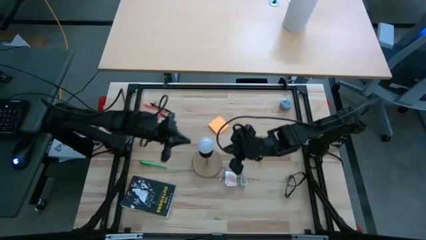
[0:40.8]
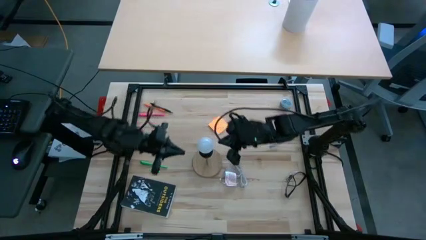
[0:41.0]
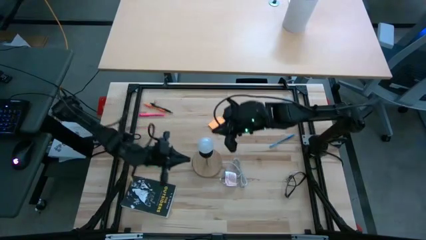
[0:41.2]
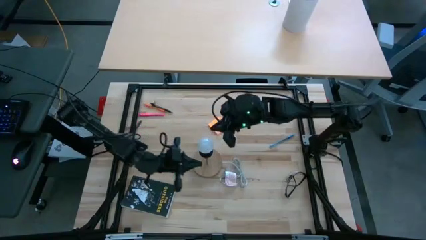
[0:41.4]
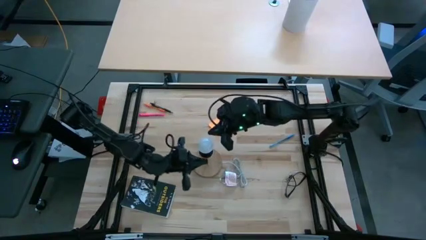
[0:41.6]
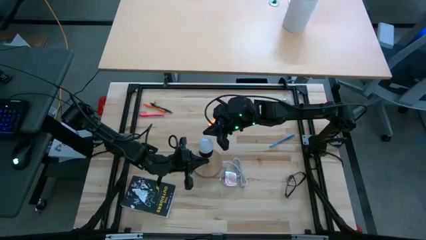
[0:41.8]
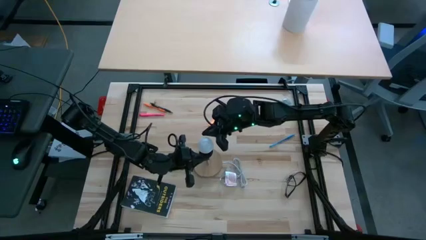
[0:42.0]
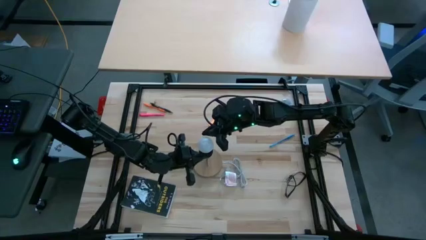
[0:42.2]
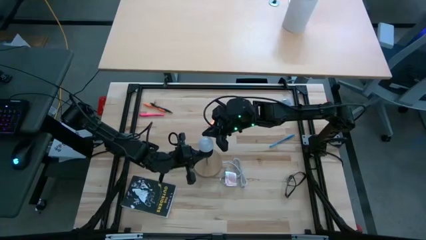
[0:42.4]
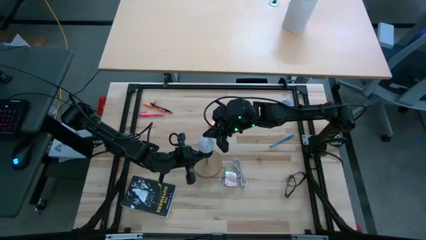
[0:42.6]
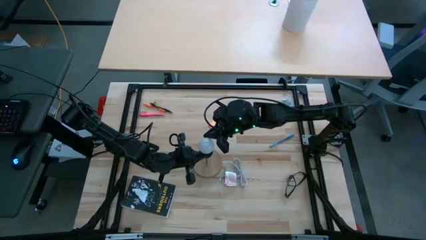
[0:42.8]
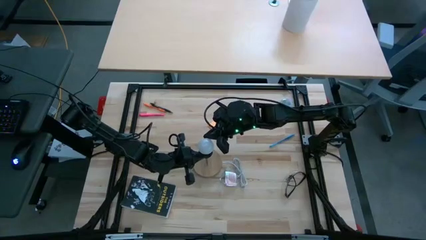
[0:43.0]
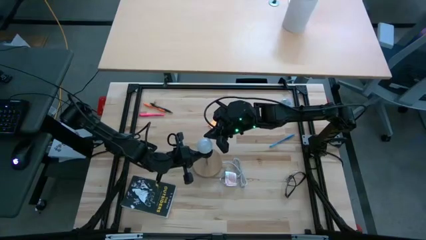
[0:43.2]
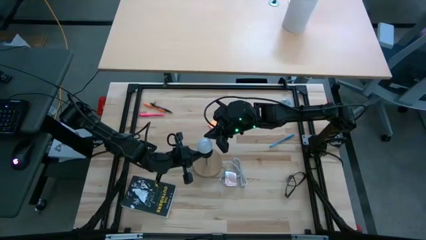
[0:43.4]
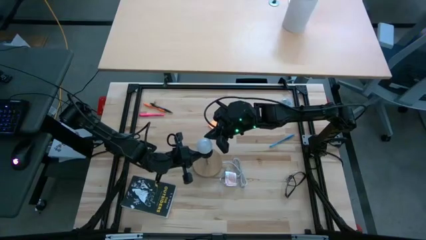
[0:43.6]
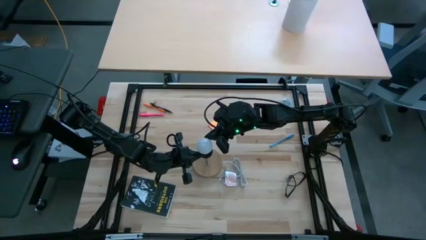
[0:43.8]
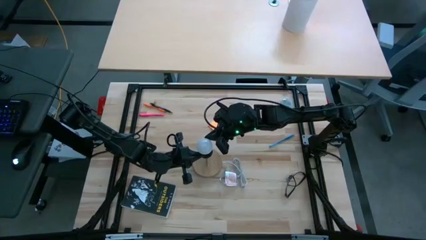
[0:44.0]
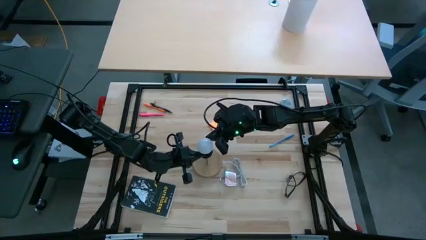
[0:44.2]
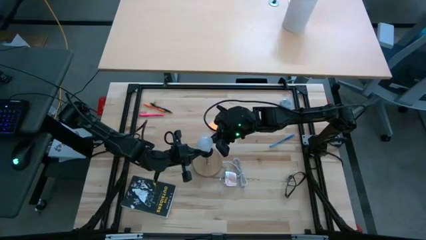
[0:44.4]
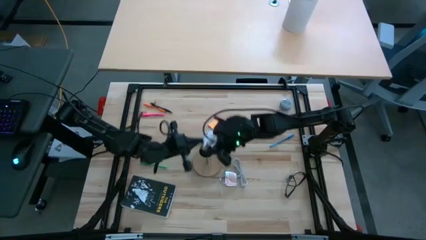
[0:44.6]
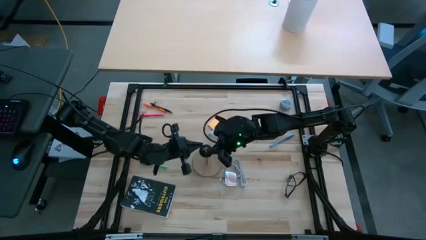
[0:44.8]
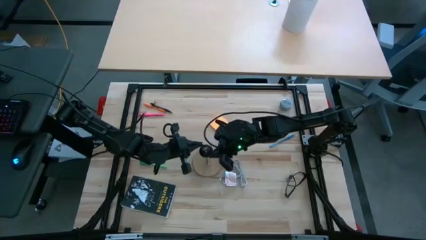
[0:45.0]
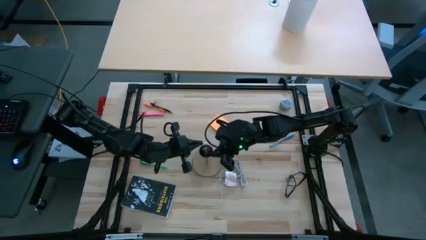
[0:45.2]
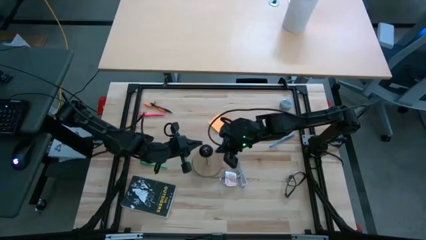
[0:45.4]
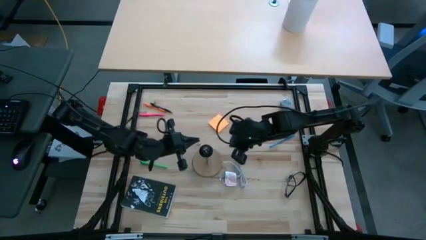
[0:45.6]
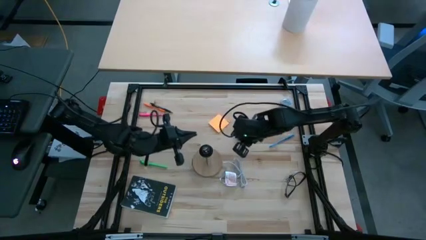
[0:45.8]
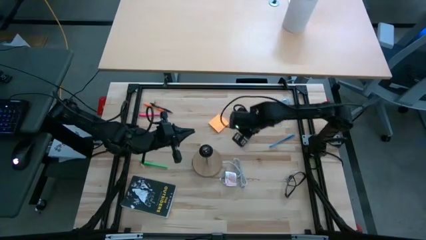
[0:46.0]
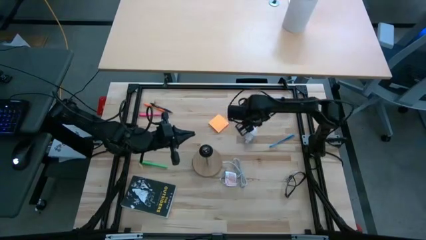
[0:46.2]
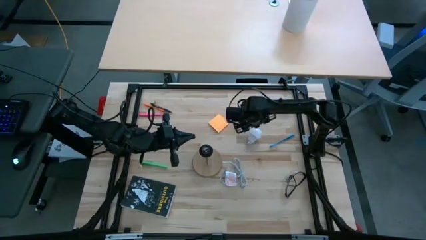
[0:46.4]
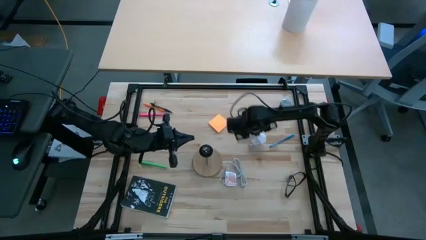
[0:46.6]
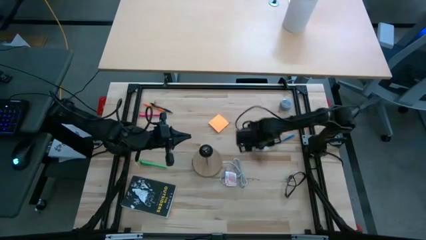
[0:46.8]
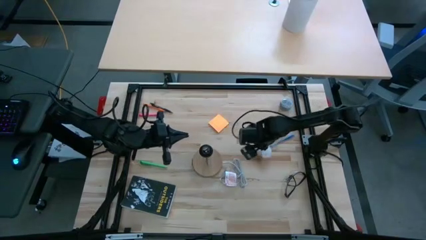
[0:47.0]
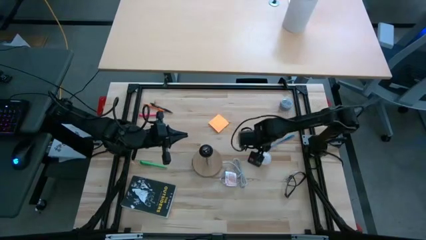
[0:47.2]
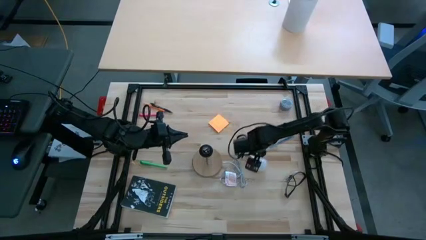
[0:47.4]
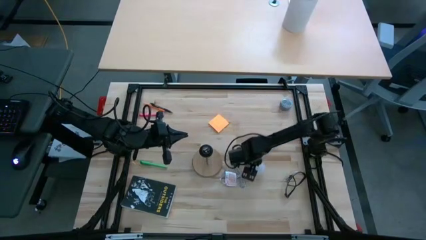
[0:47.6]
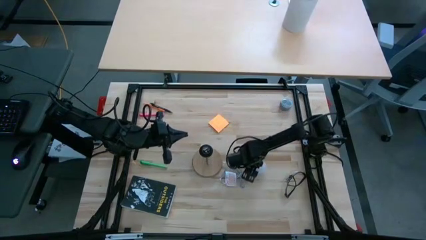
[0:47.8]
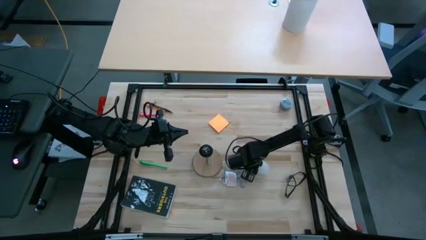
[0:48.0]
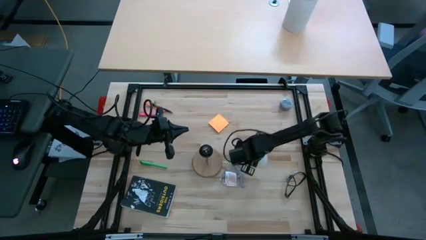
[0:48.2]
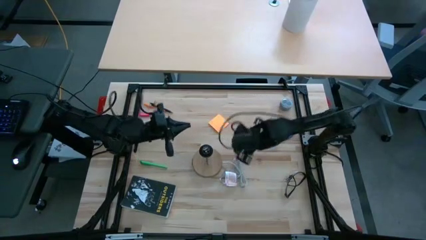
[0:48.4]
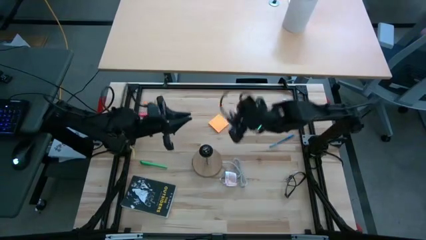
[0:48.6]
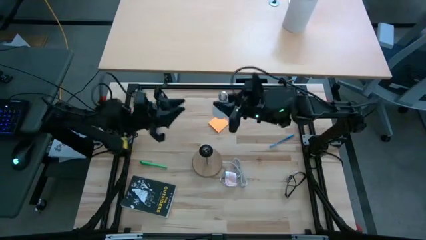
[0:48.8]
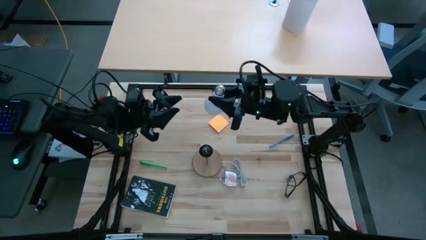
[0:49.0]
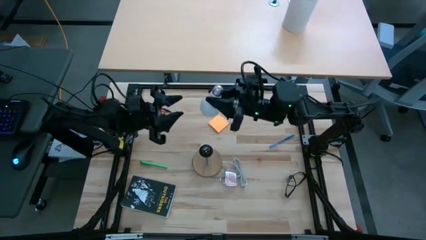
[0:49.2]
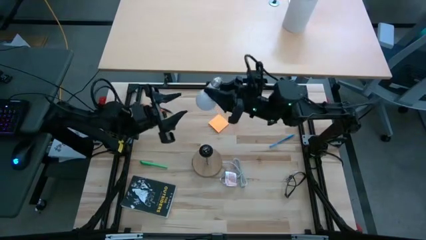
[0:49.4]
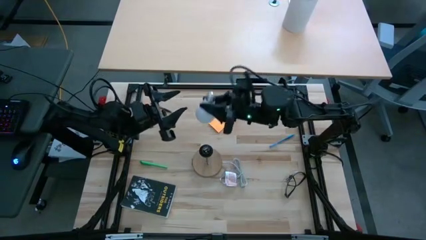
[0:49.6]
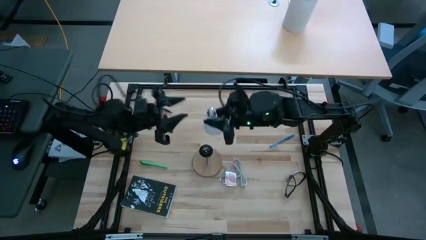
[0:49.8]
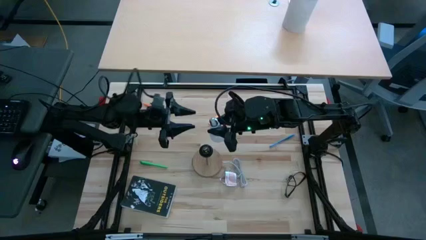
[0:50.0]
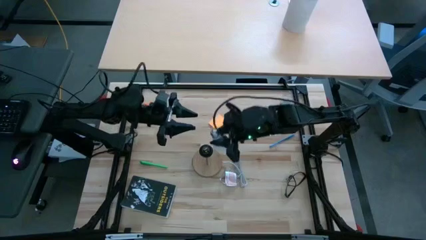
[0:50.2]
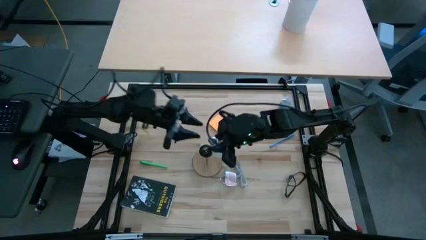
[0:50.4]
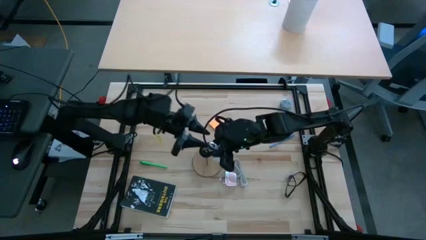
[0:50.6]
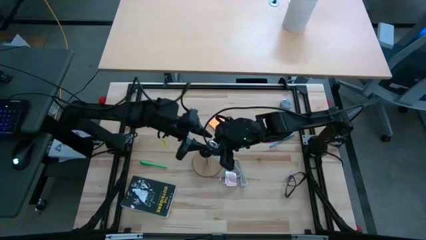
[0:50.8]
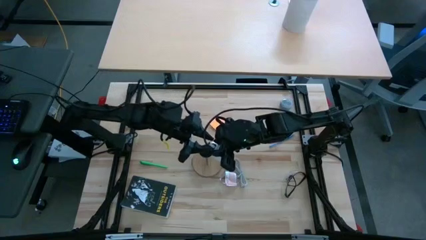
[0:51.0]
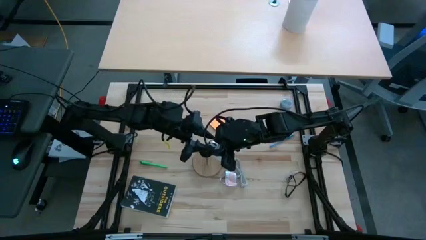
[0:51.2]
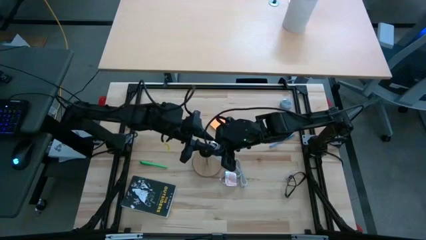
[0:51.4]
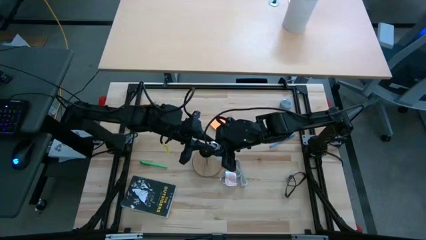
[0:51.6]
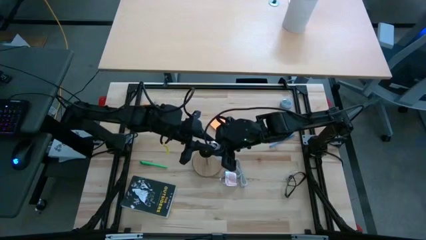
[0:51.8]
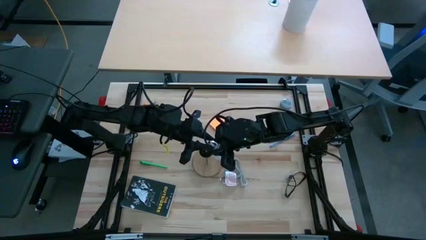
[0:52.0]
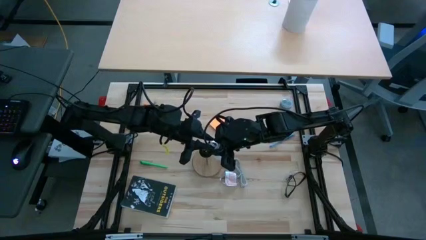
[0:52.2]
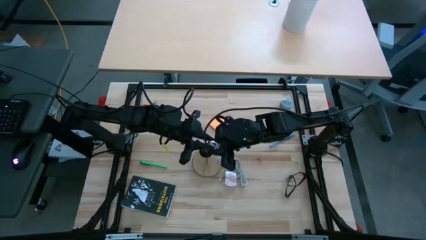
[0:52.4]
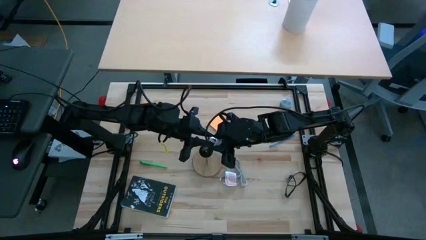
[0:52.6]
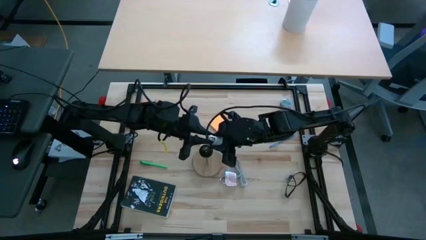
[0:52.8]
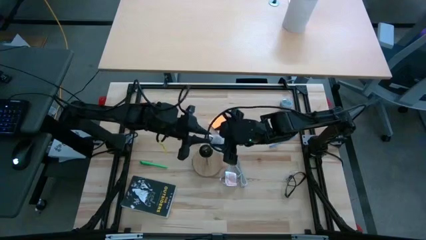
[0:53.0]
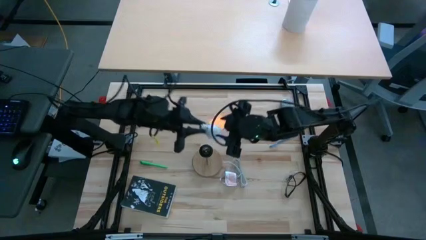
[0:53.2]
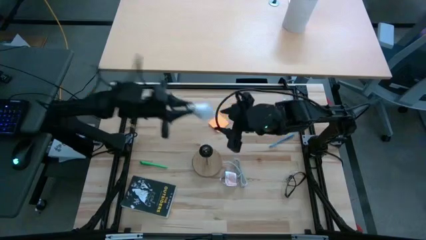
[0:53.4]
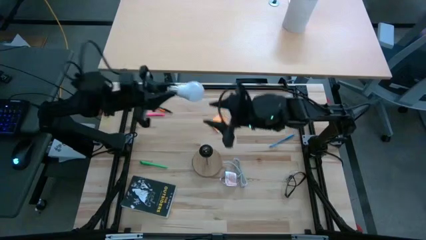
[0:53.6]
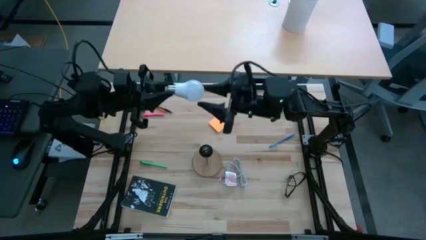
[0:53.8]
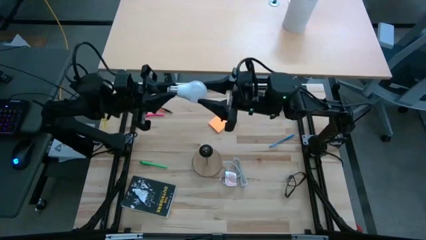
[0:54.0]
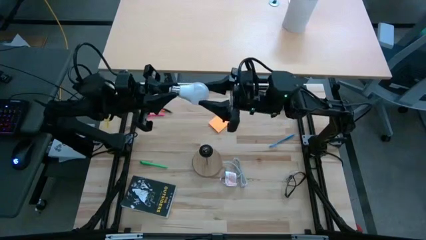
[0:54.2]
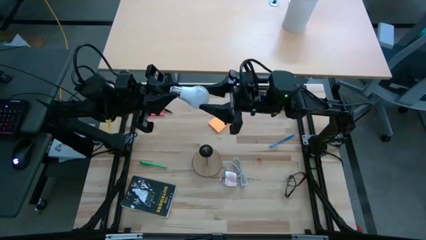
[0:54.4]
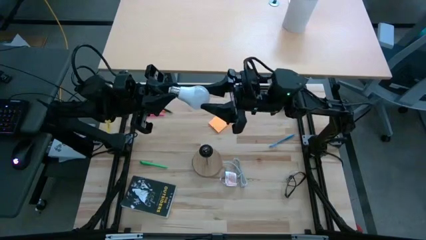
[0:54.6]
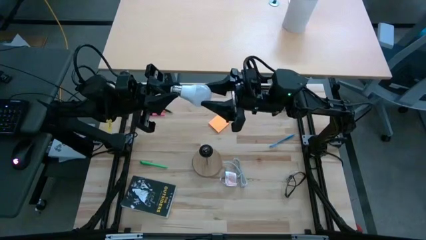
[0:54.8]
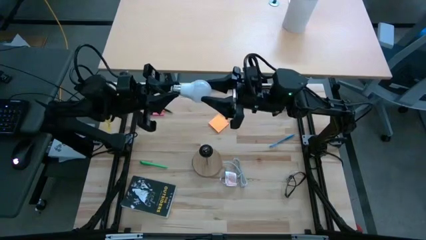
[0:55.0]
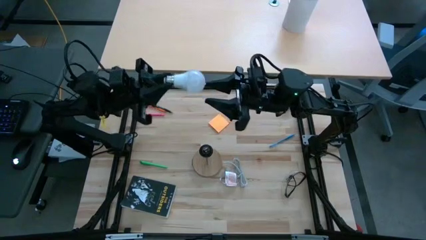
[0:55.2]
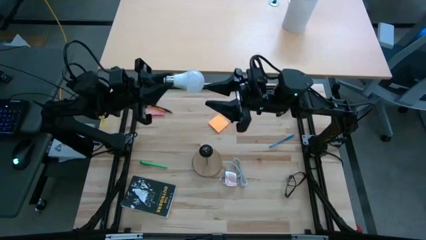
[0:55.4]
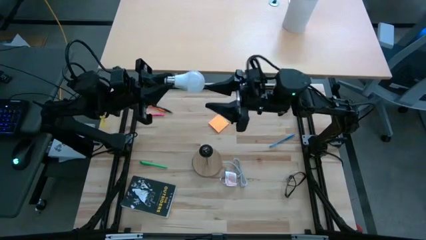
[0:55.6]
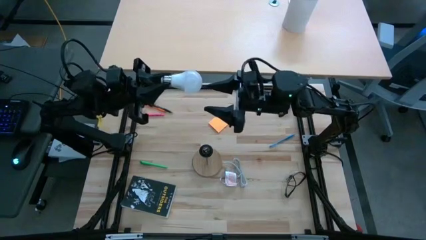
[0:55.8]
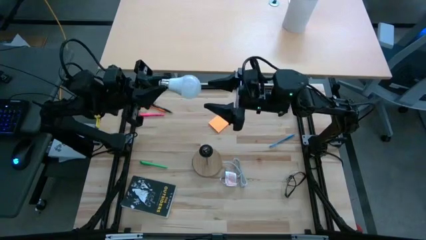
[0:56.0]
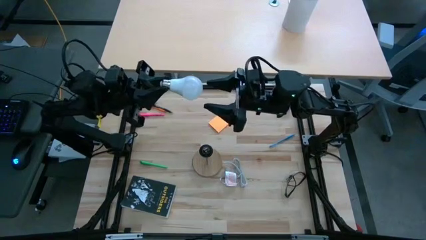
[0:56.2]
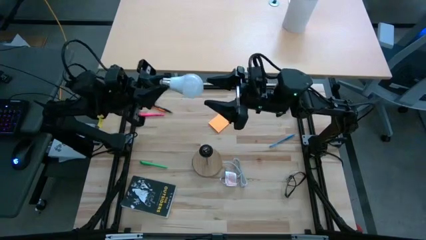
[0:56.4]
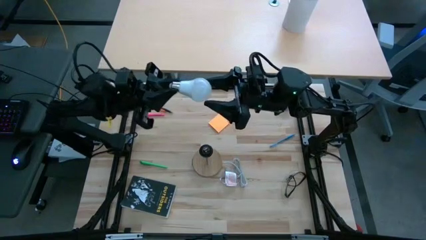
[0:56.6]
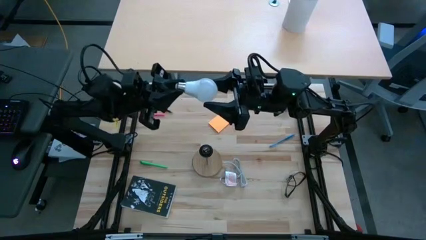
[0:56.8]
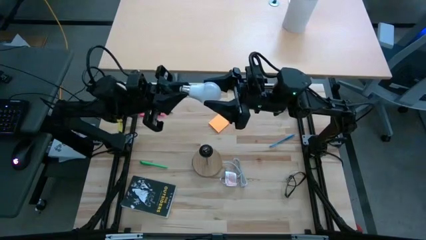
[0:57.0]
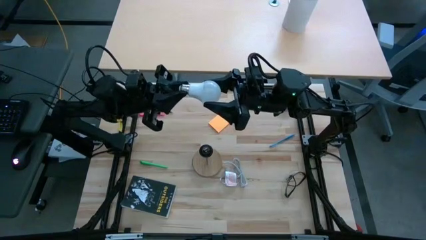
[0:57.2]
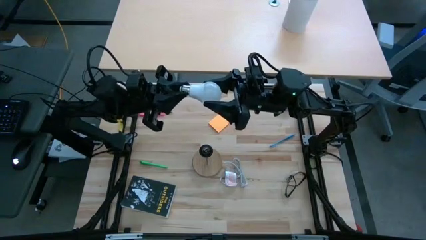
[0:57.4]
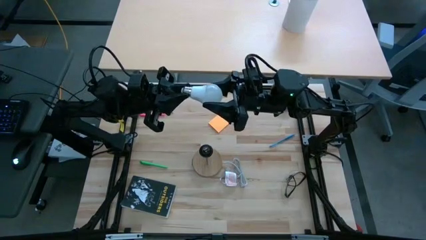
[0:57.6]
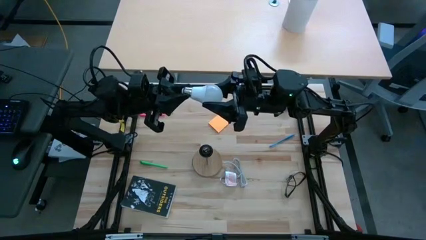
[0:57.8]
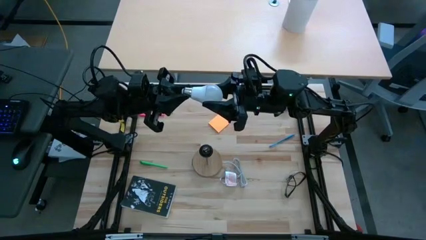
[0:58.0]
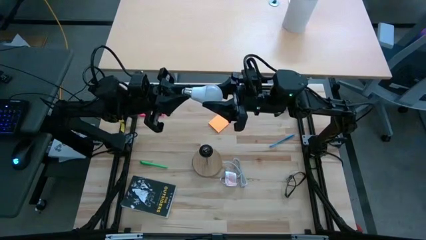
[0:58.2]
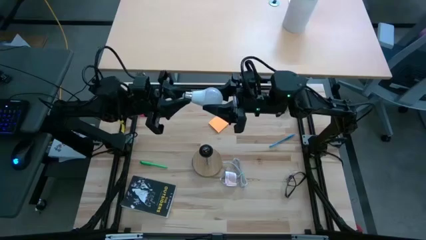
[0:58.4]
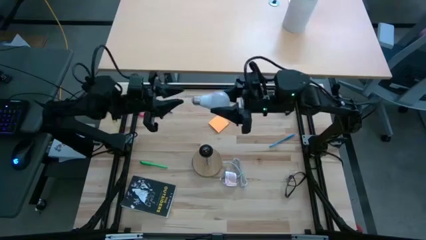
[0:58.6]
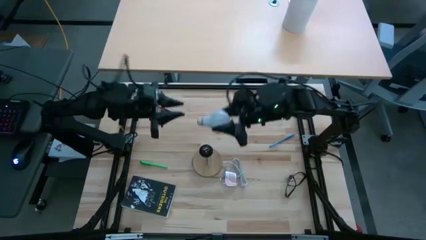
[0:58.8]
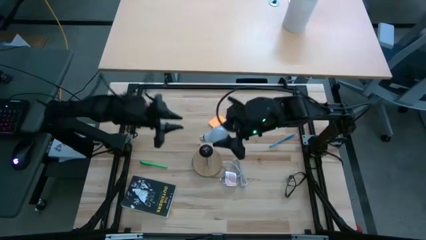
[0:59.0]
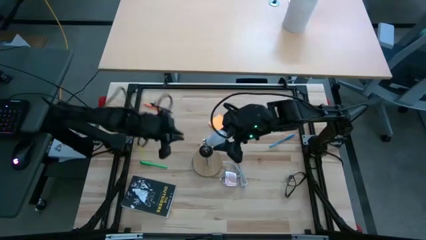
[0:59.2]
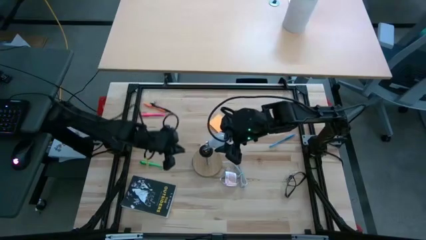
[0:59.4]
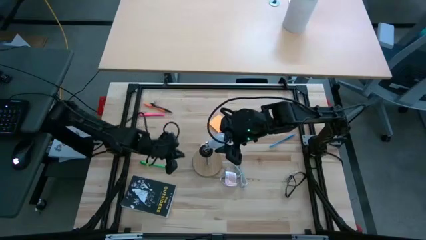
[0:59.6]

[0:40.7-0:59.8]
Task: Screw lightbulb
Insert the white lightbulb into the lamp
